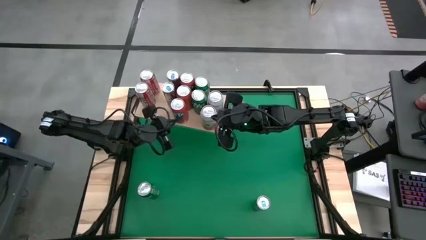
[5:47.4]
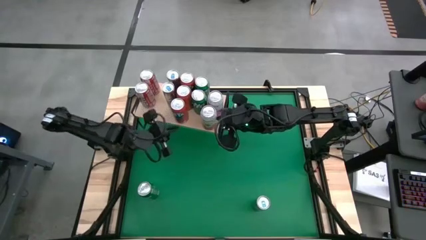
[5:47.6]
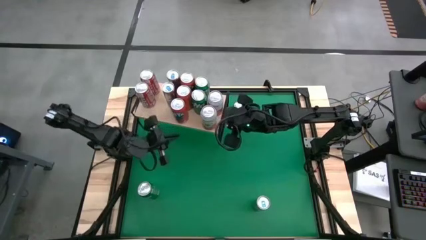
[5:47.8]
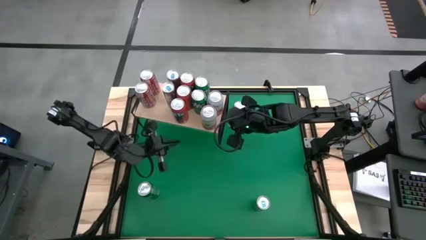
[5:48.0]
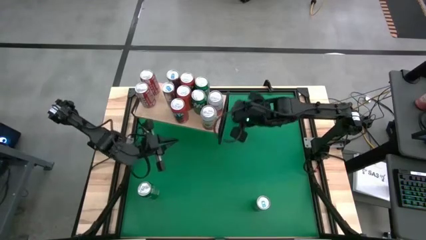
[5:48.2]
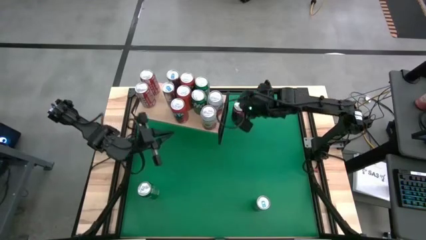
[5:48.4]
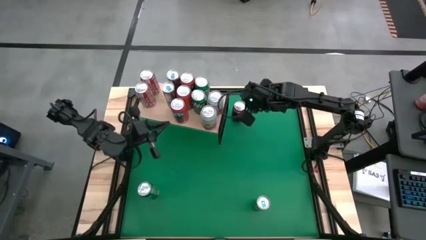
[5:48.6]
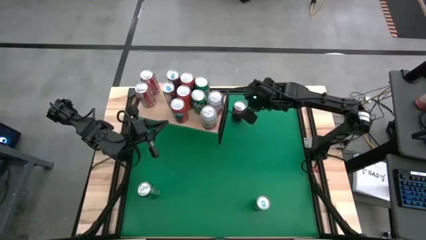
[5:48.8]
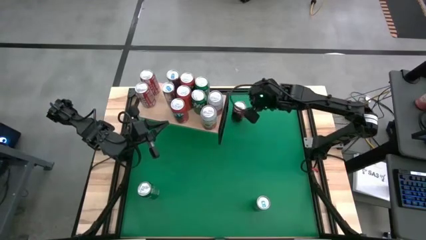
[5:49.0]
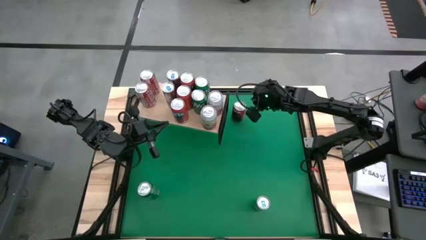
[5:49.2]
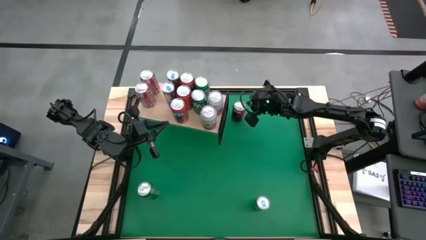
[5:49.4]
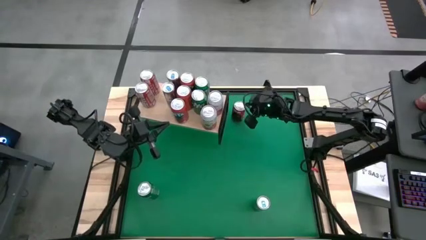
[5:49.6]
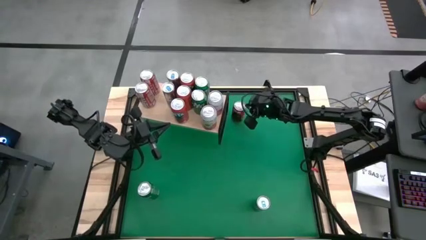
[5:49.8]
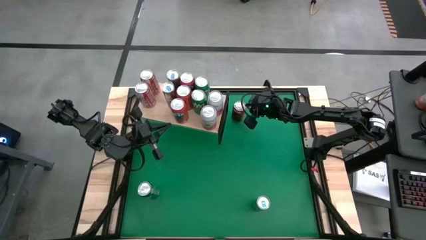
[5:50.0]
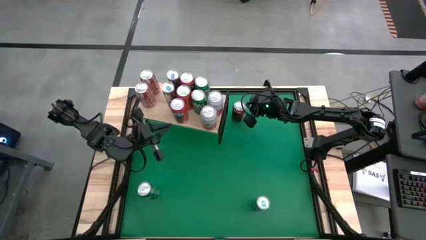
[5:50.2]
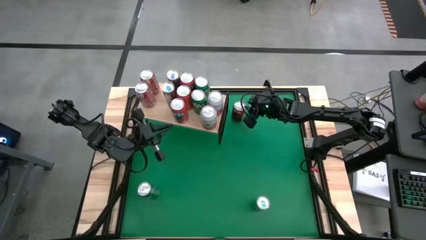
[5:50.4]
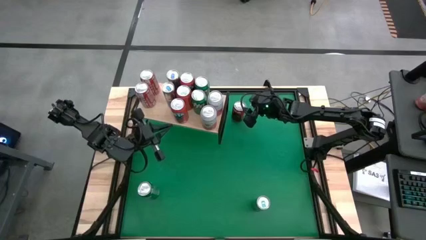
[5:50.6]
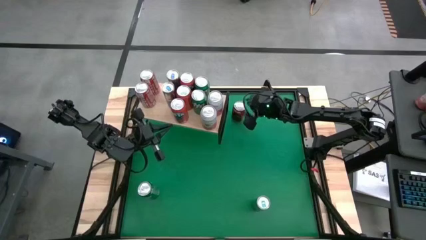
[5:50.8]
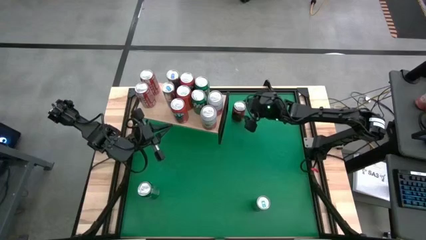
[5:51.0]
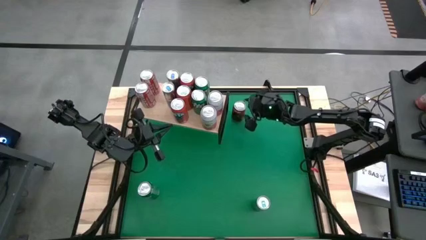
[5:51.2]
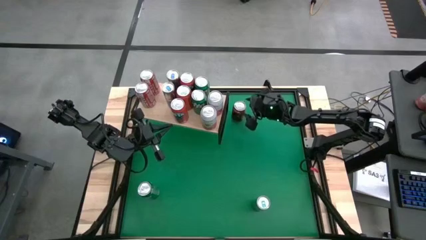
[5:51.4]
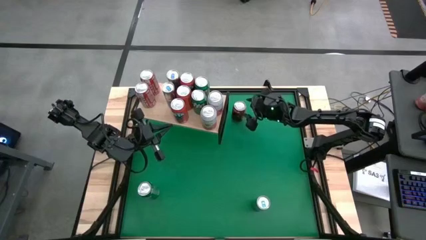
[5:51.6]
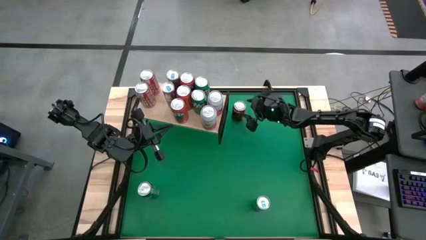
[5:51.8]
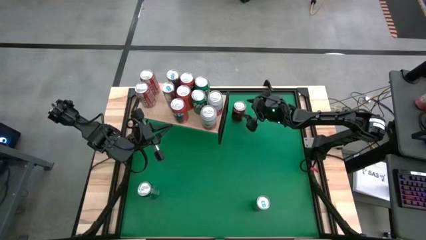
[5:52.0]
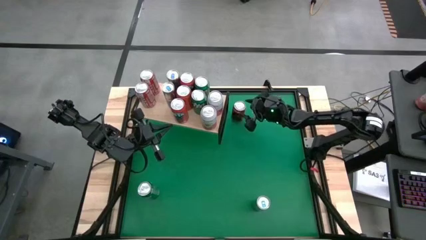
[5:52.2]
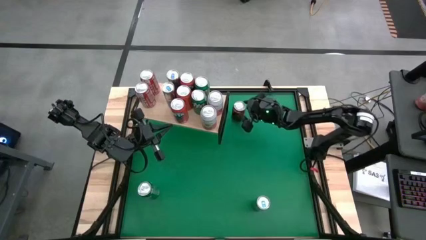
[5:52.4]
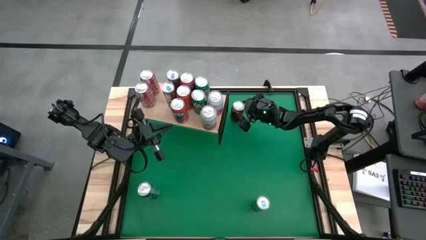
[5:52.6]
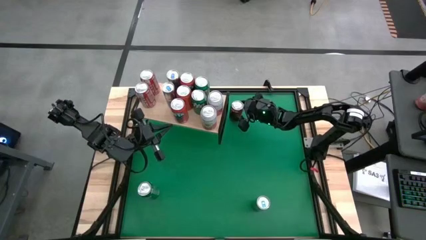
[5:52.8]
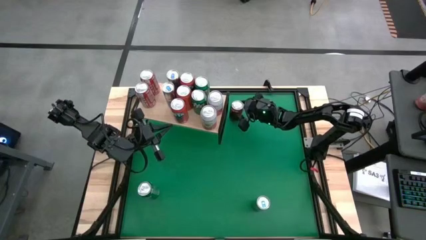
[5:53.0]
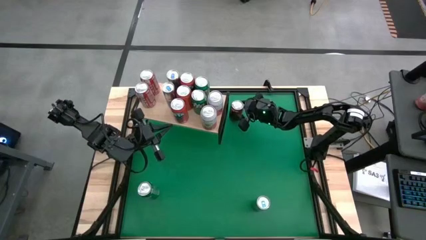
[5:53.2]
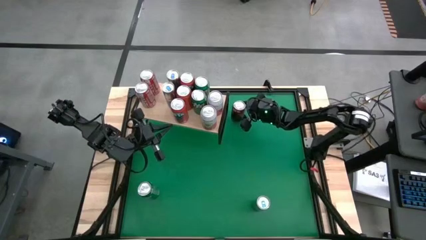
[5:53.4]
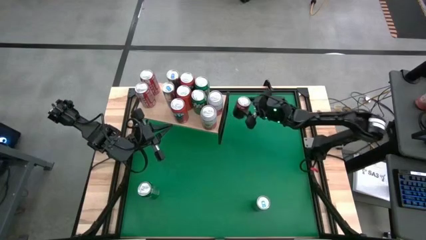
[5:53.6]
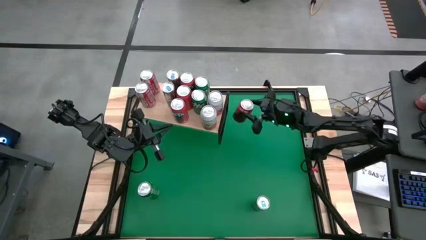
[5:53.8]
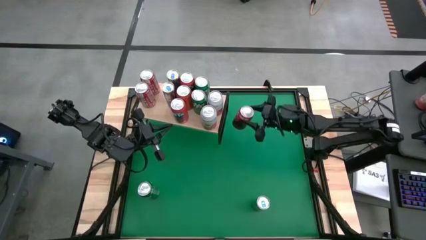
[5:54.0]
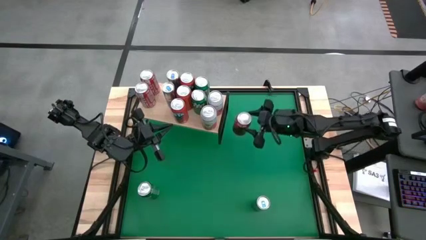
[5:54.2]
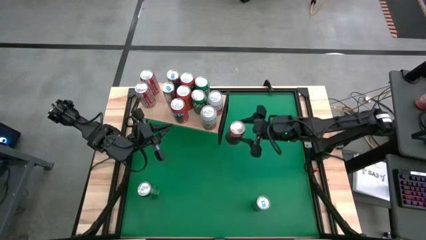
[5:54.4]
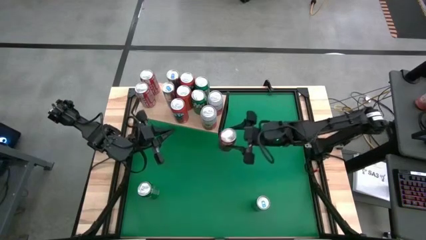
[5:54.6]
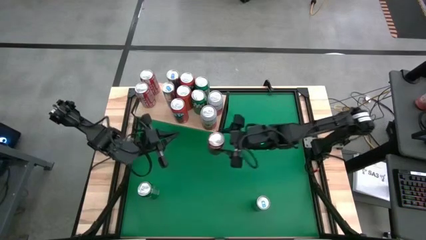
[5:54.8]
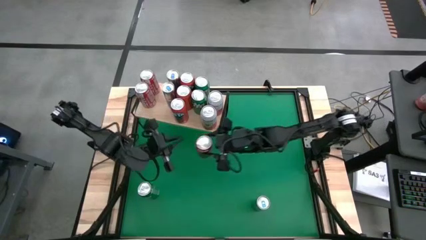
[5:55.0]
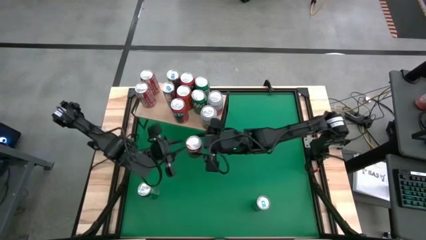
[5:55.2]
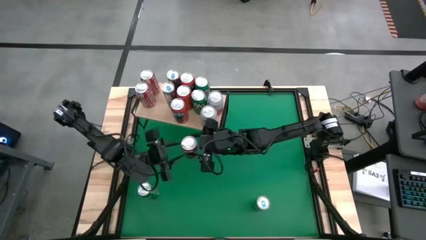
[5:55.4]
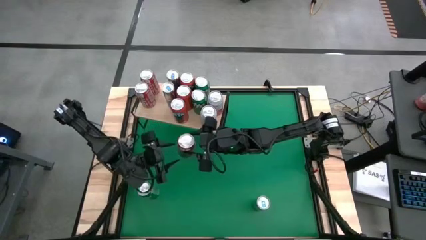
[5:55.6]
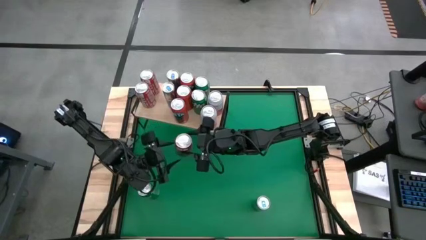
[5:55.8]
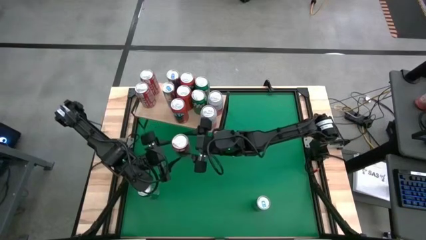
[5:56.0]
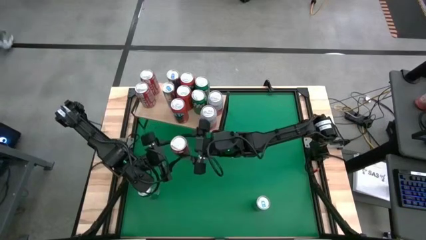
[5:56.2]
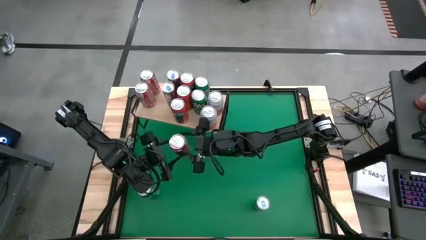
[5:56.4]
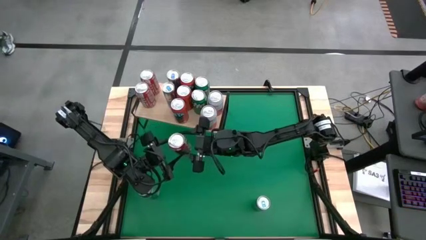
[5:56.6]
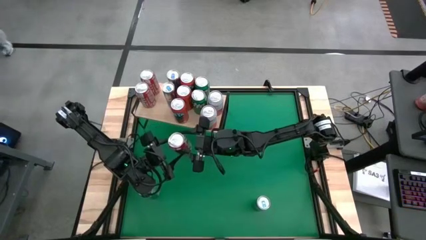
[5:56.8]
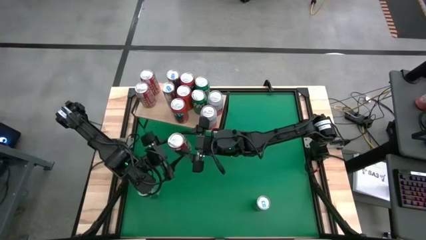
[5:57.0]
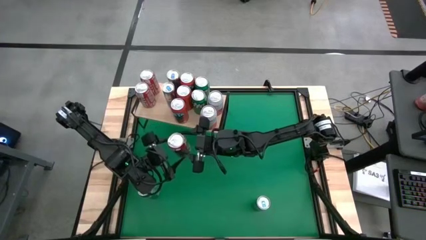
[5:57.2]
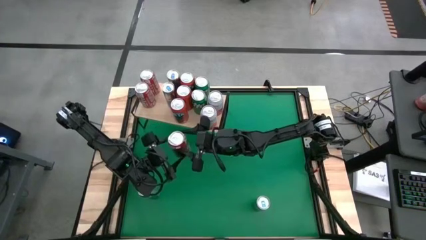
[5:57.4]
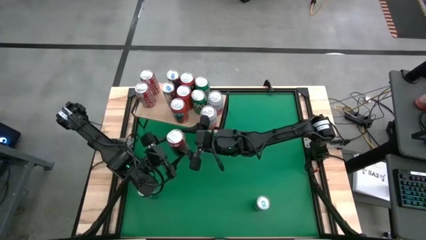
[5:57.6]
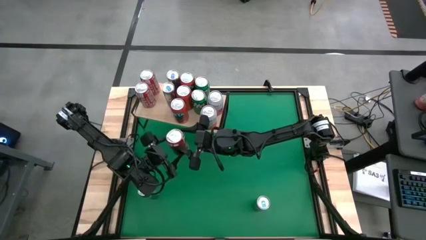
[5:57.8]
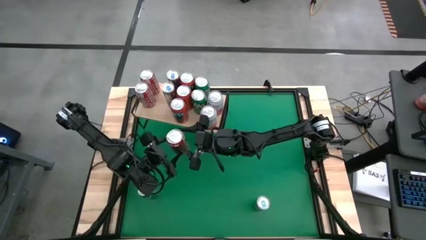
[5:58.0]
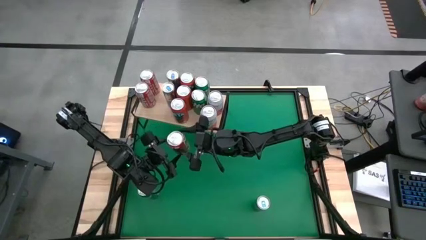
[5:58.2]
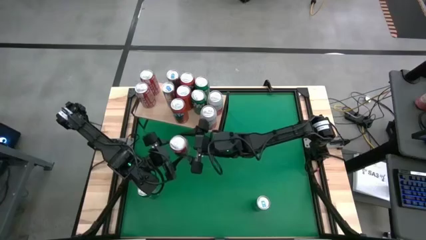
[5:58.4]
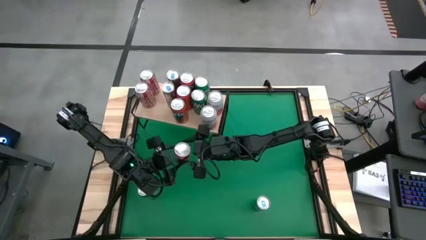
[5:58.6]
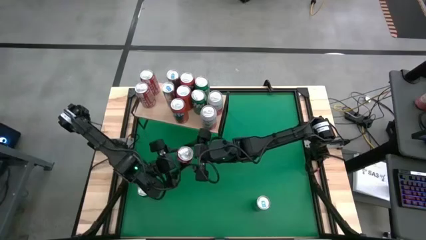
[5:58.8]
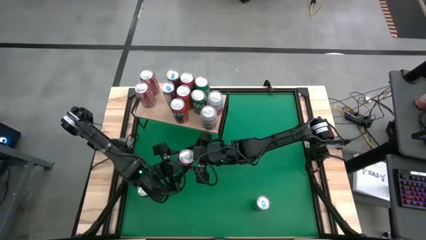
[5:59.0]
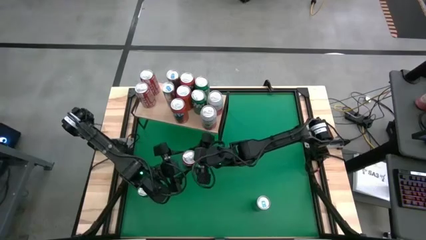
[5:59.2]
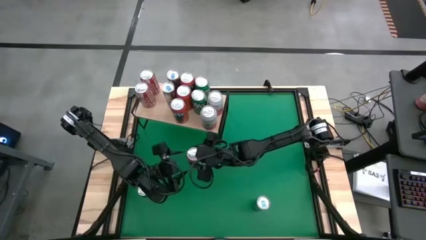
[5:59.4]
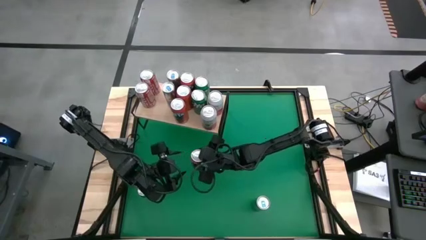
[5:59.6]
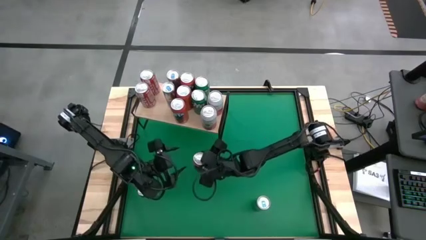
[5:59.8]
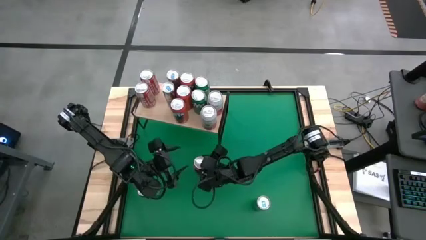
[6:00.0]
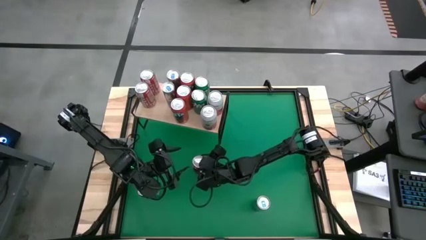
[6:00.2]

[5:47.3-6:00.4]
Task: Place canned beverage on shelf
Put the red/black soda can on the shelf aligned with the other red/black soda can

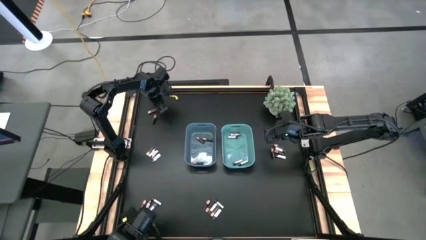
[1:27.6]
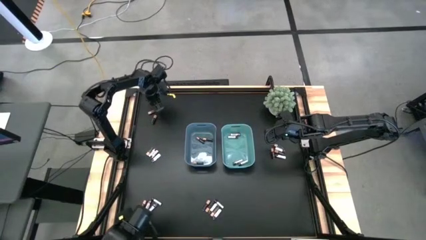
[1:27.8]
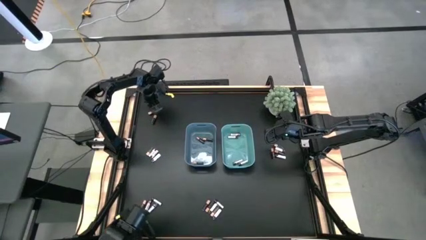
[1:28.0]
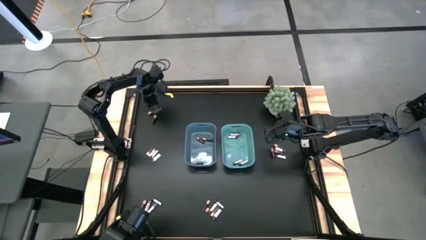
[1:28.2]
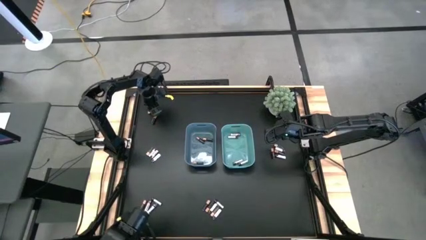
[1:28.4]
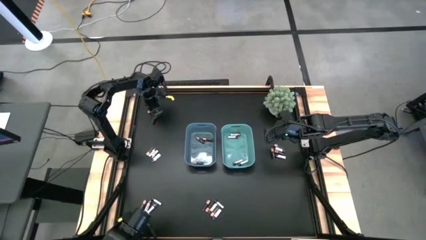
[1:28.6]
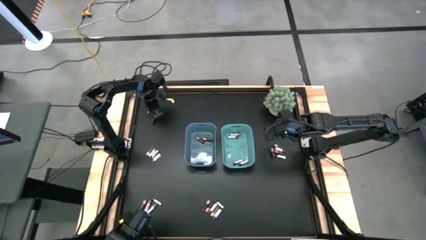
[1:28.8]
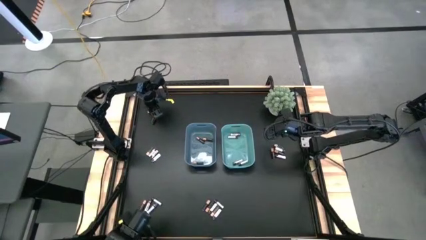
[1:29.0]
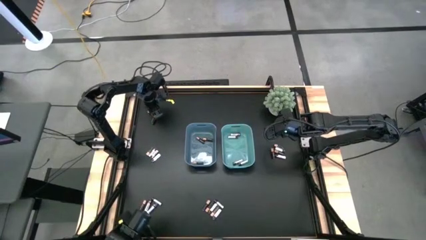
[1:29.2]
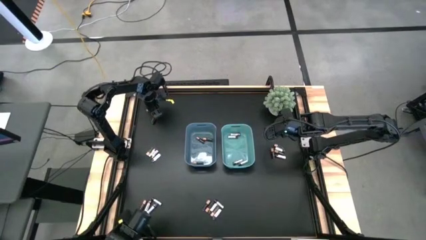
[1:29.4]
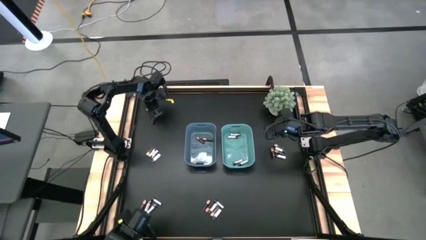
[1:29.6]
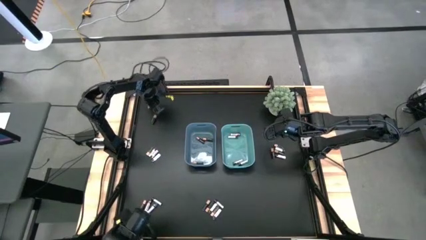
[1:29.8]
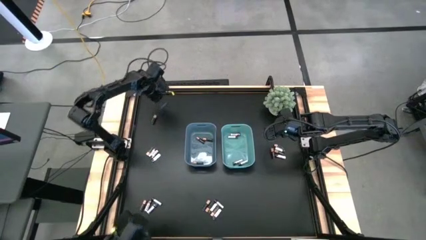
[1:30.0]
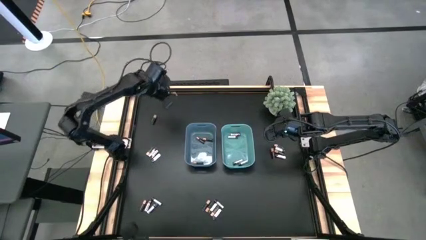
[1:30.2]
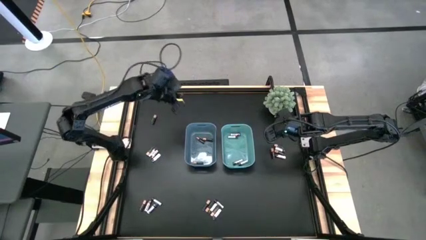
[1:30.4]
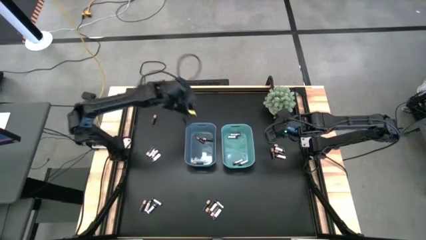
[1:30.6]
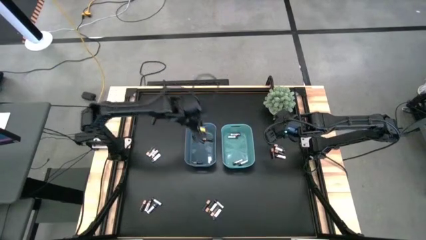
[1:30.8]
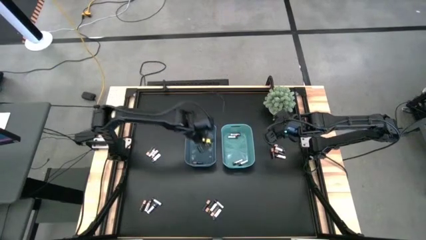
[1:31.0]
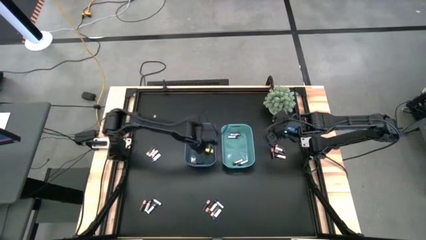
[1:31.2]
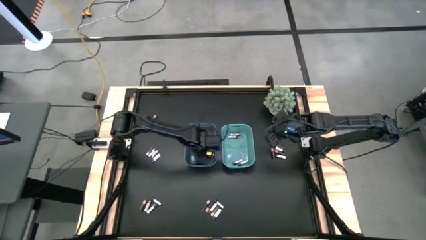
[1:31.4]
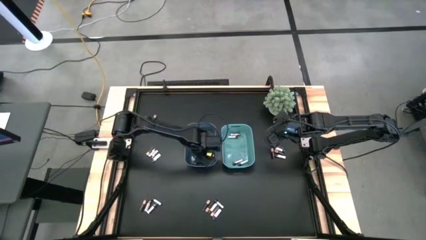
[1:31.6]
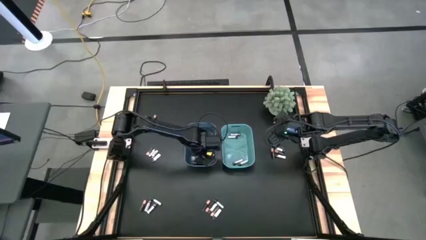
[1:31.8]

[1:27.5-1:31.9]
Task: Sort batteries
Put the black battery into the blue bin
